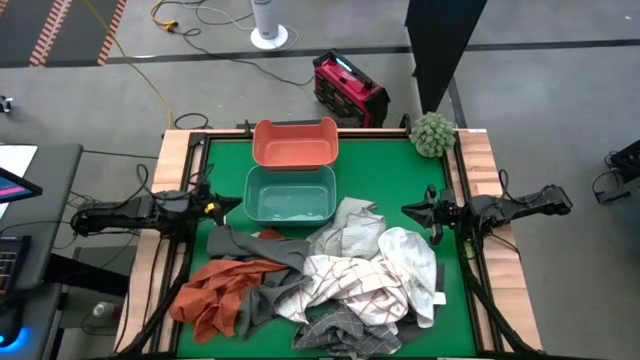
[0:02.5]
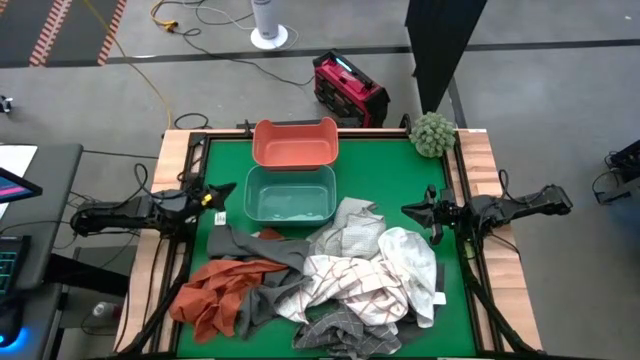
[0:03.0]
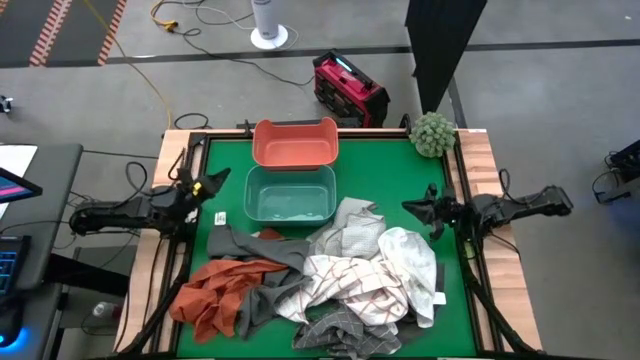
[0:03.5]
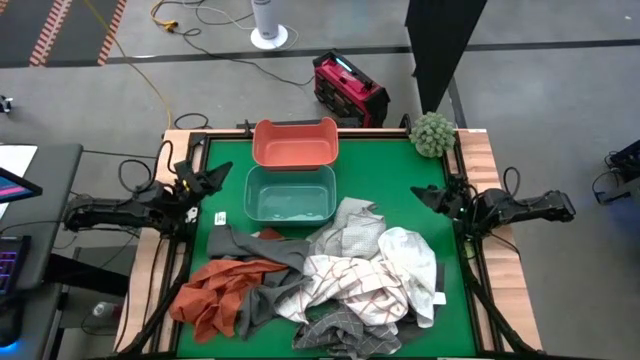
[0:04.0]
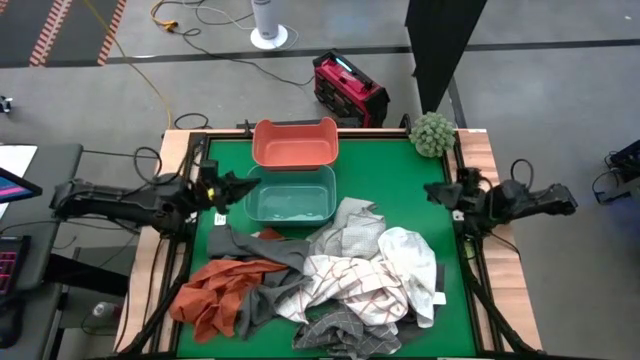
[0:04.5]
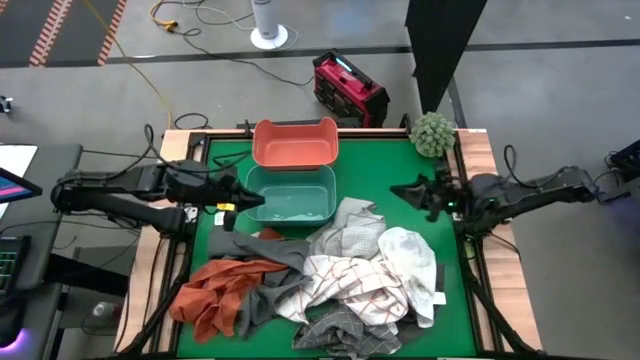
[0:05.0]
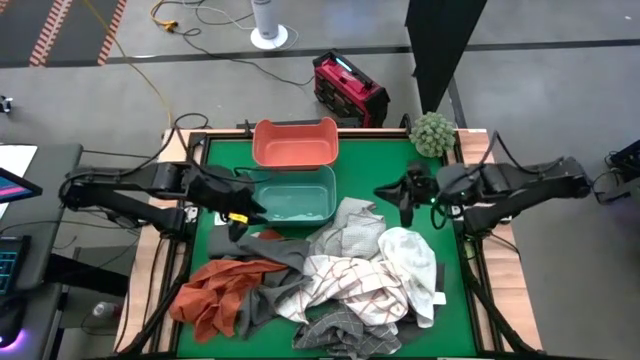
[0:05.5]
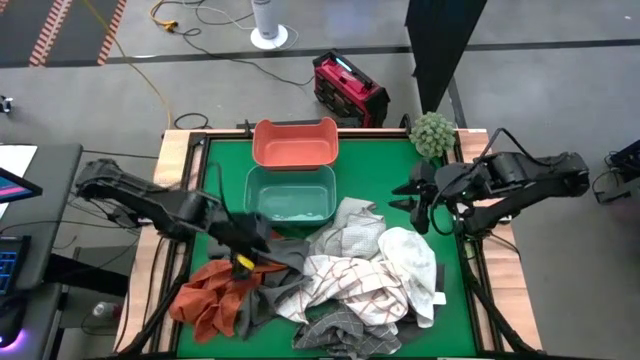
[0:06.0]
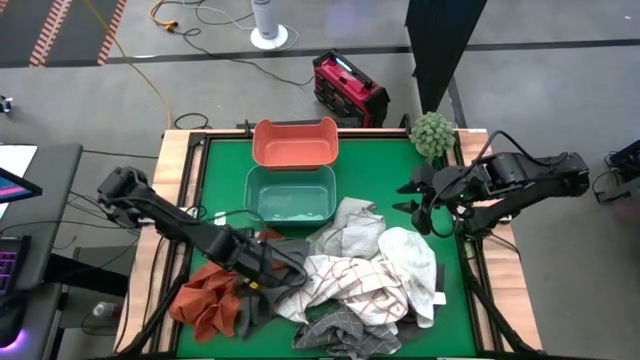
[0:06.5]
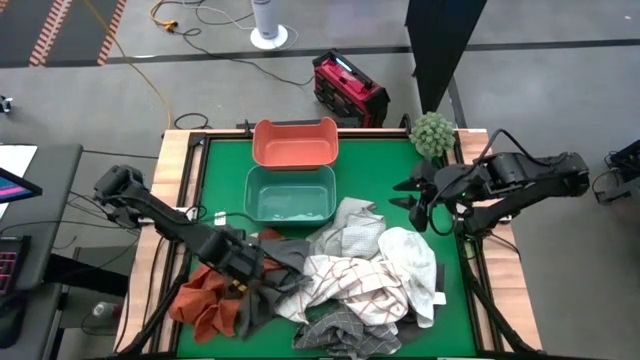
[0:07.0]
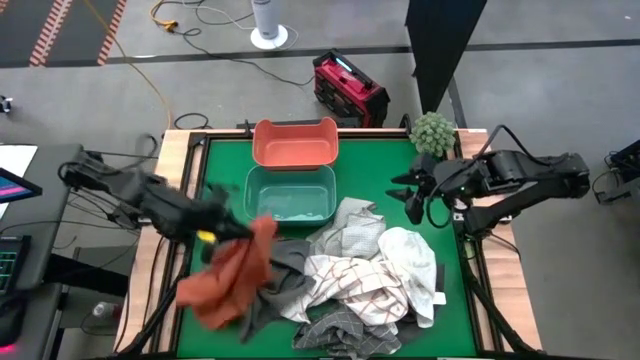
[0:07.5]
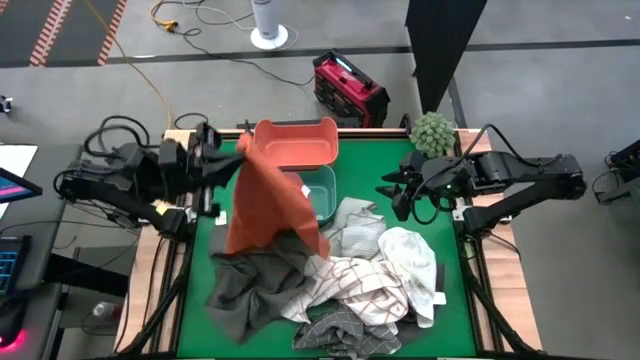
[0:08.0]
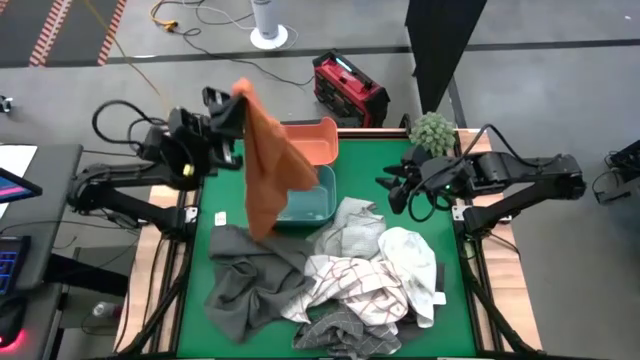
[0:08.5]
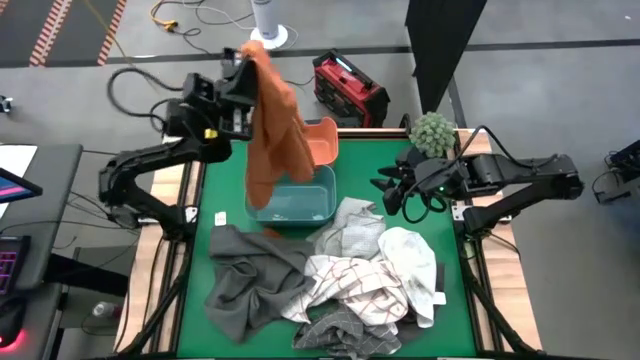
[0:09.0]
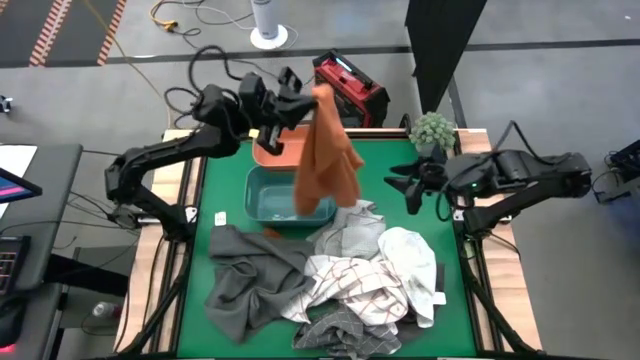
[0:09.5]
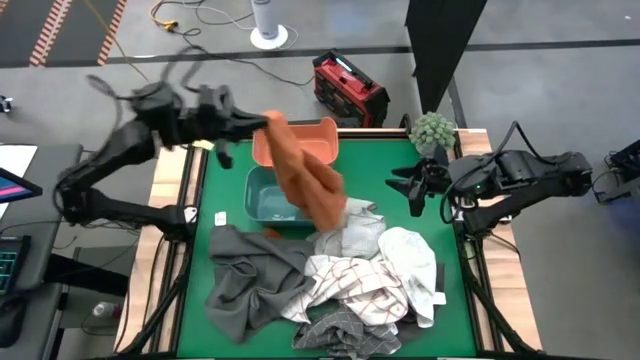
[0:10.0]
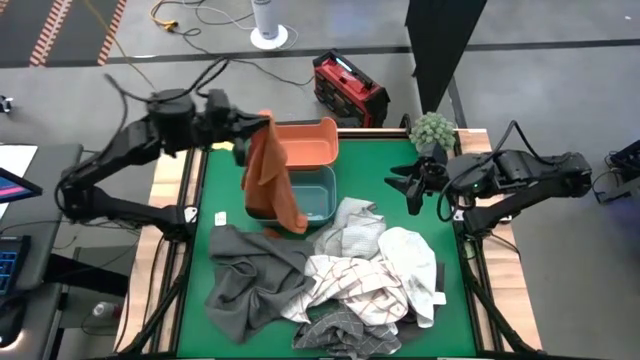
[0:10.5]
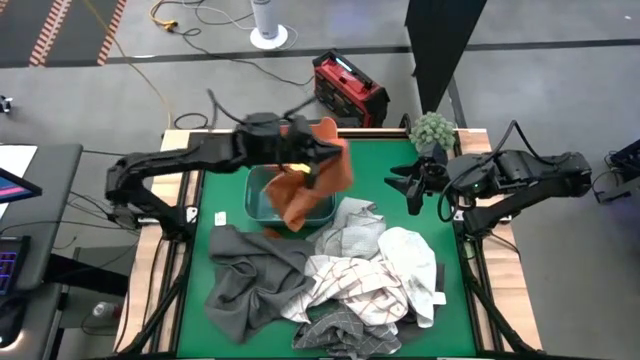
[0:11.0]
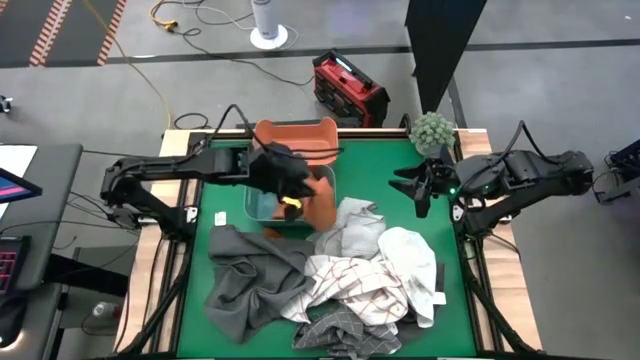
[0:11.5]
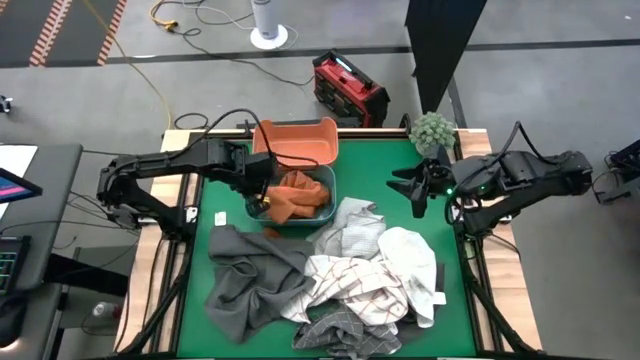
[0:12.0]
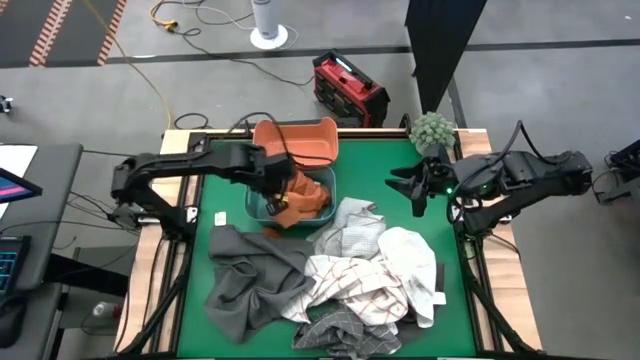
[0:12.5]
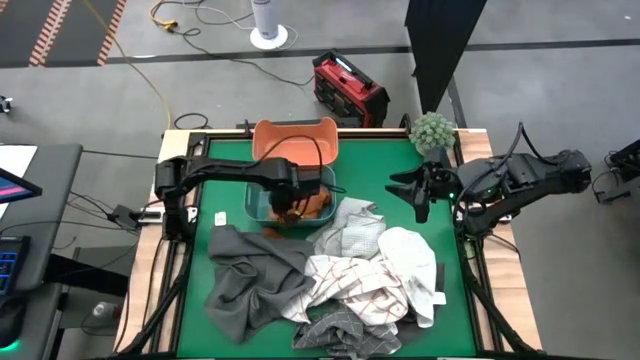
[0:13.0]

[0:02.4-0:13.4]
Task: Sort towels by color in basket
Put the orange towel into the green bin

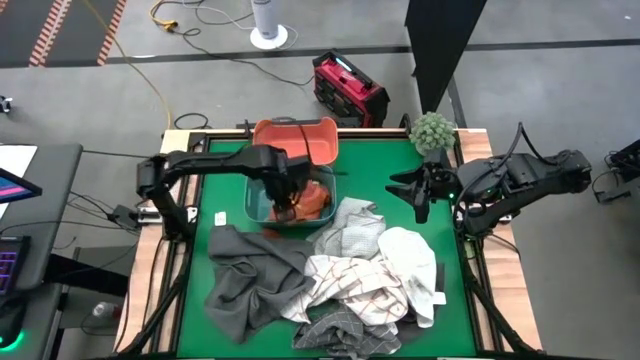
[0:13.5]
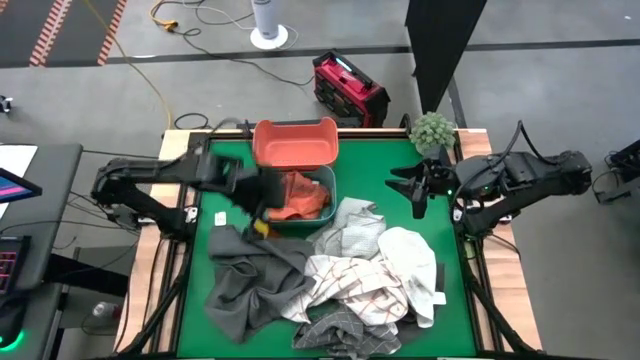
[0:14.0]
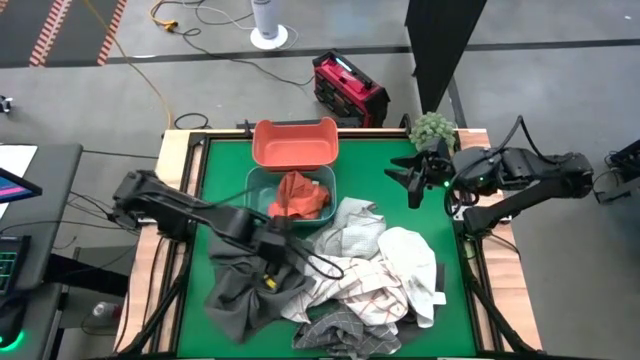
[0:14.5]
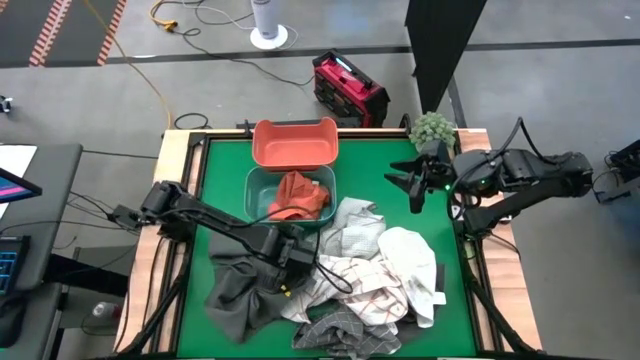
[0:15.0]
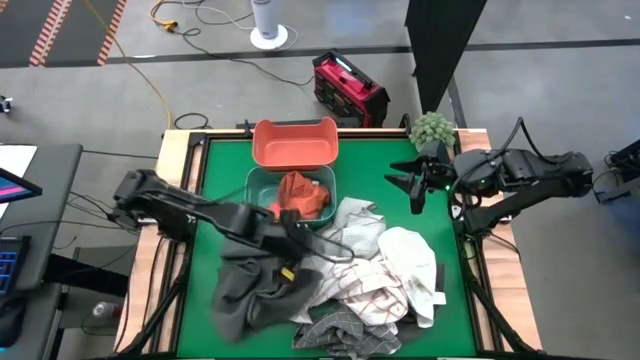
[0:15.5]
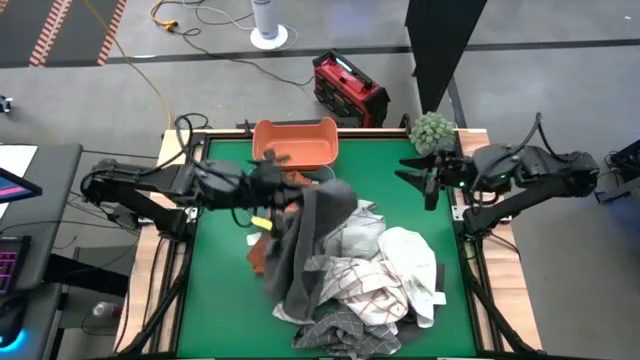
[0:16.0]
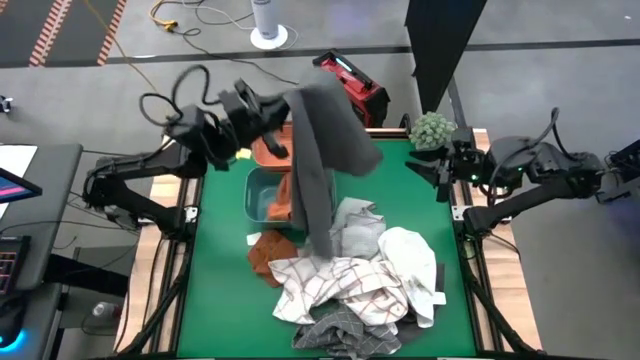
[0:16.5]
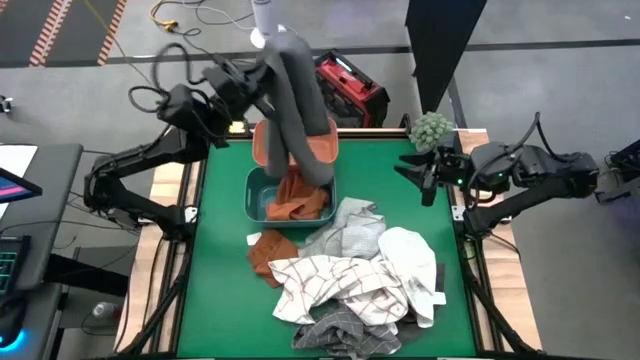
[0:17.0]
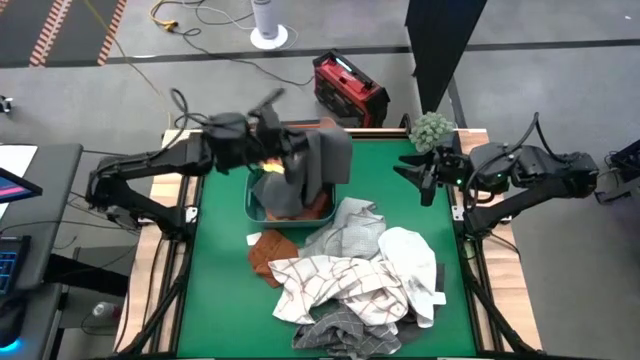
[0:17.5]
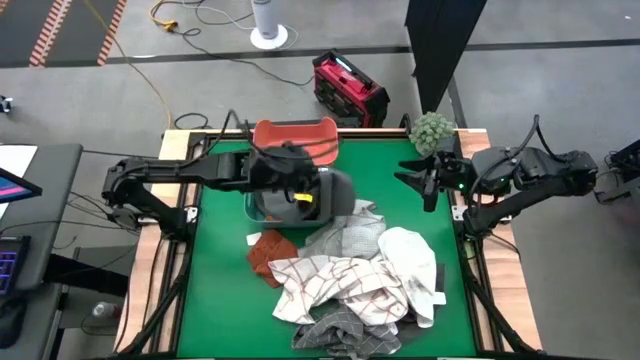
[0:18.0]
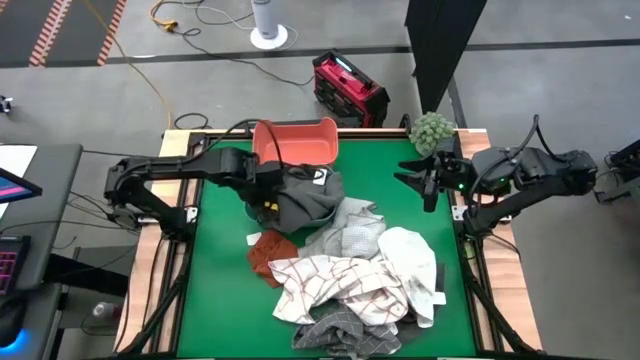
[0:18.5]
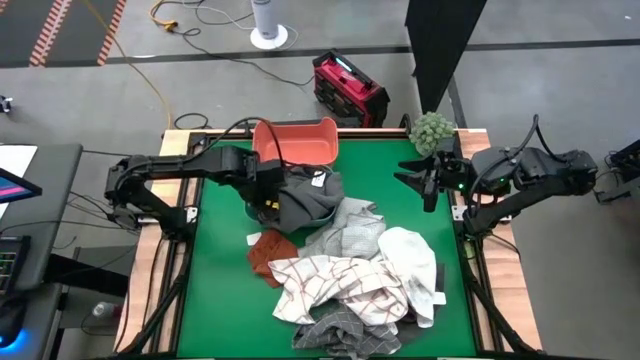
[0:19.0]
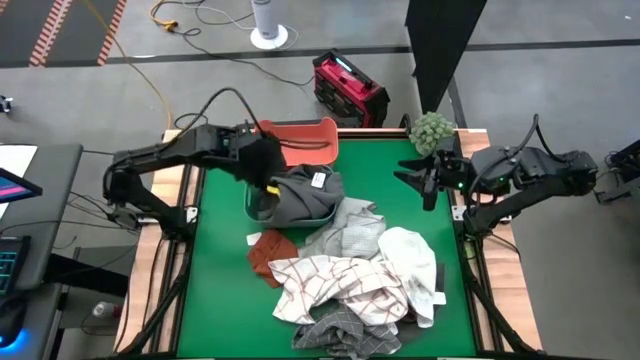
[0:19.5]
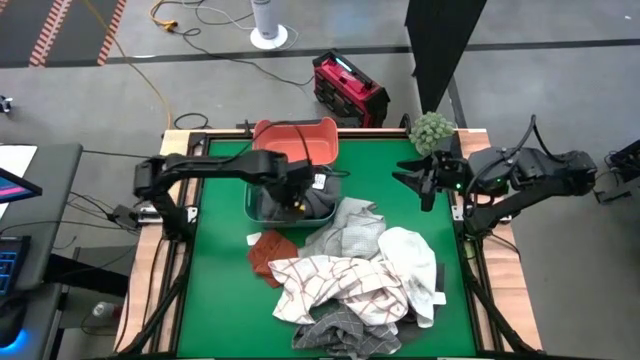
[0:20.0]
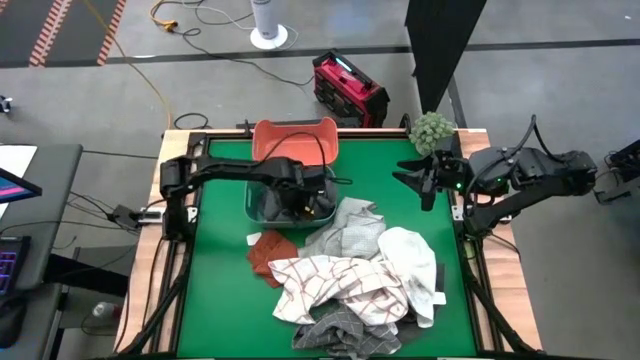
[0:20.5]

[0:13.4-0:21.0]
Put the dark grey towel into the green bin

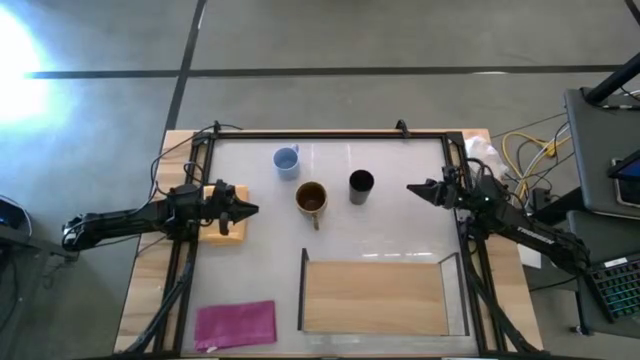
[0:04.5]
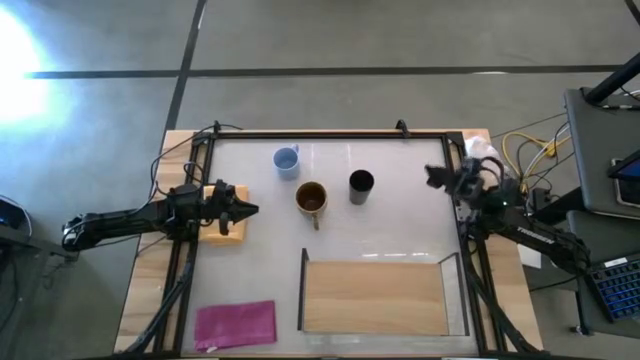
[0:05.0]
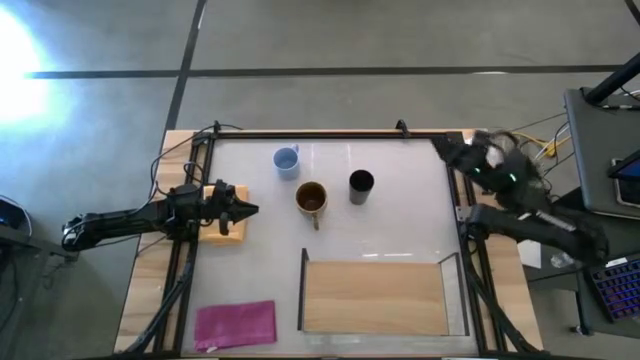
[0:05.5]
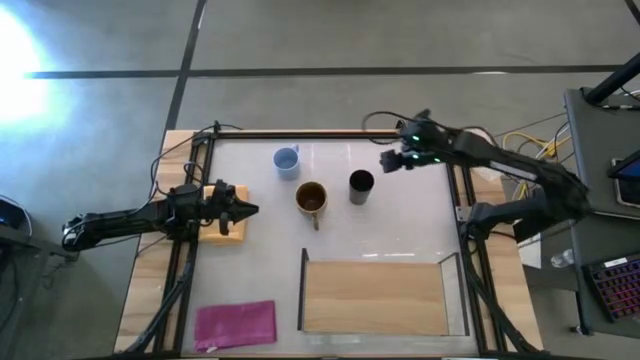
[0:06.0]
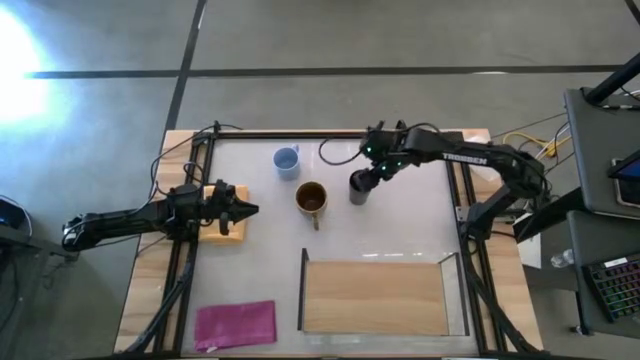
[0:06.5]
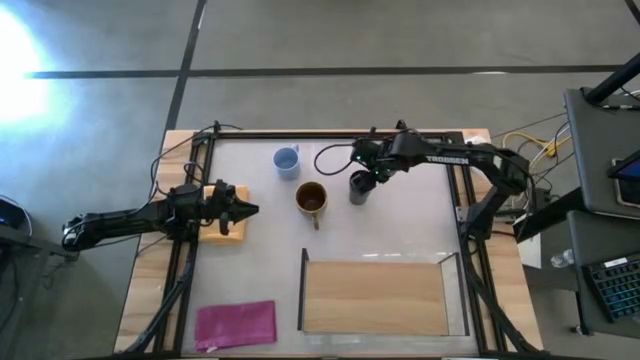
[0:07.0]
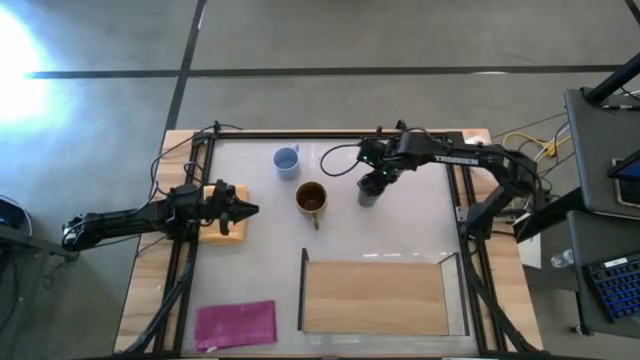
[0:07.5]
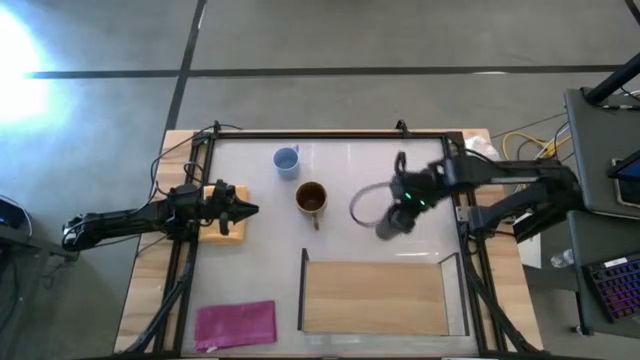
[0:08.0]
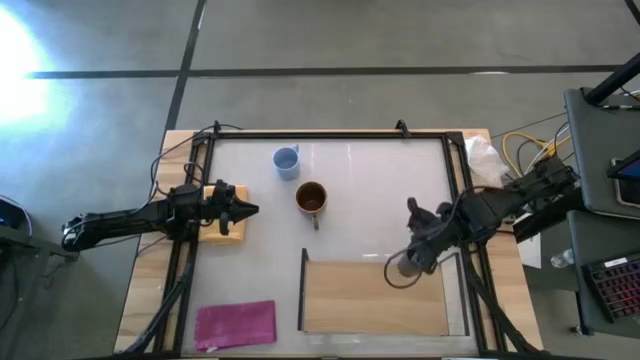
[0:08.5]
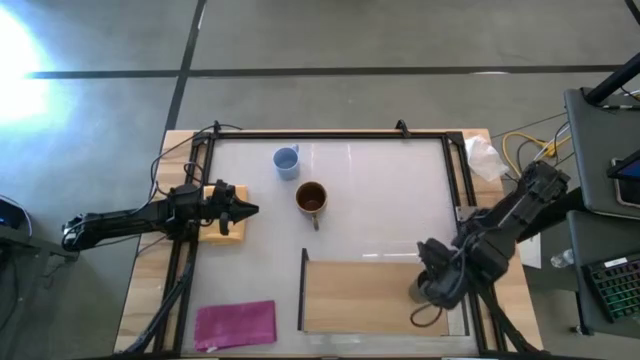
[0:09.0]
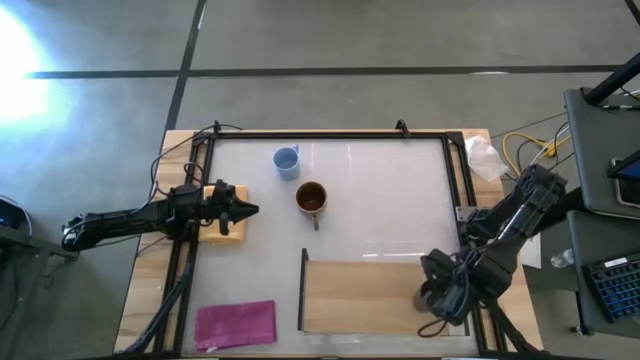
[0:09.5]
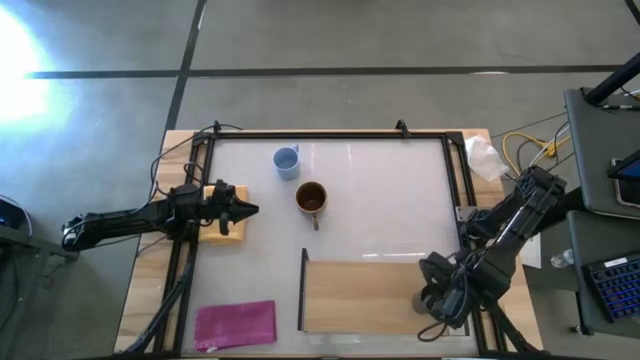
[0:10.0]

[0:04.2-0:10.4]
Task: Stack small to large cups/mugs on shelf
Put the black cup on the shelf
